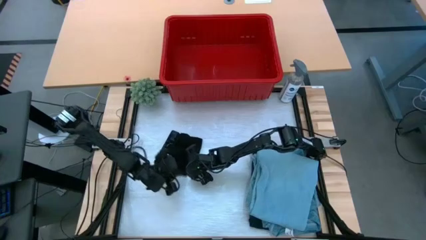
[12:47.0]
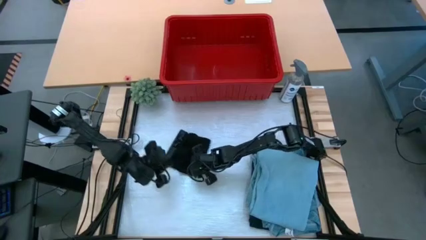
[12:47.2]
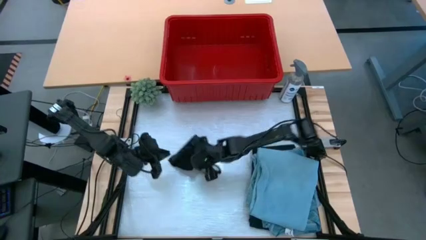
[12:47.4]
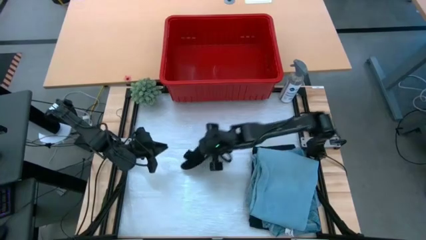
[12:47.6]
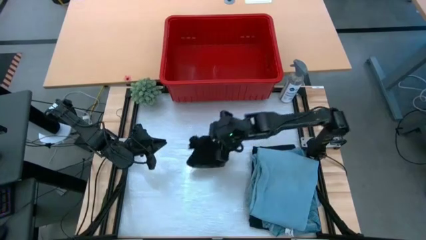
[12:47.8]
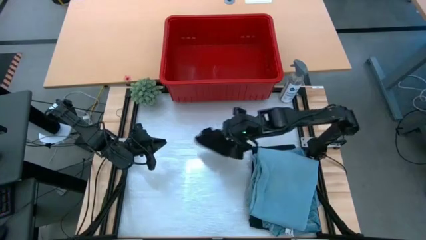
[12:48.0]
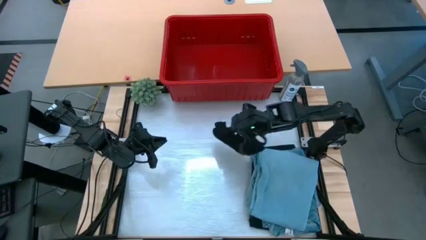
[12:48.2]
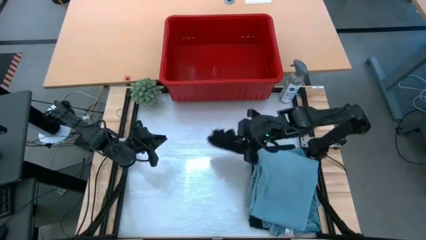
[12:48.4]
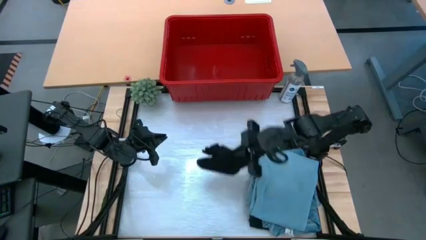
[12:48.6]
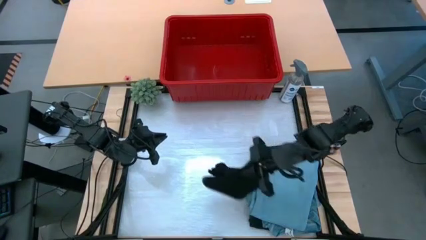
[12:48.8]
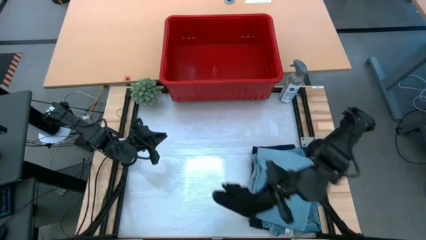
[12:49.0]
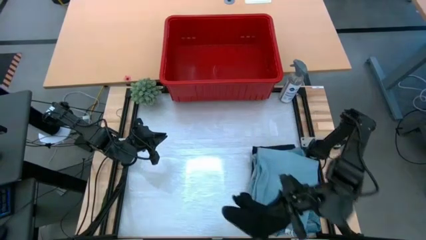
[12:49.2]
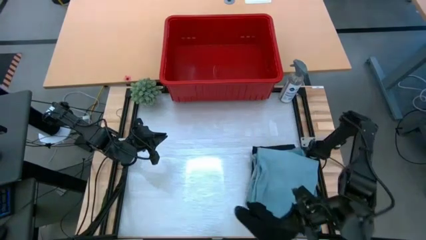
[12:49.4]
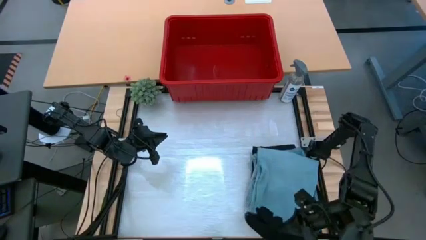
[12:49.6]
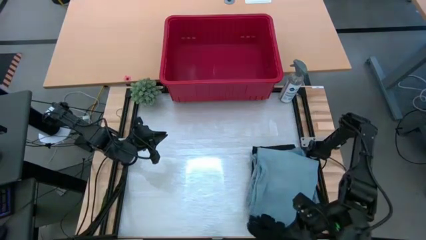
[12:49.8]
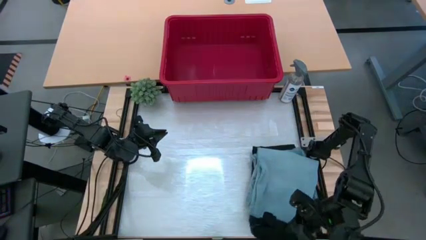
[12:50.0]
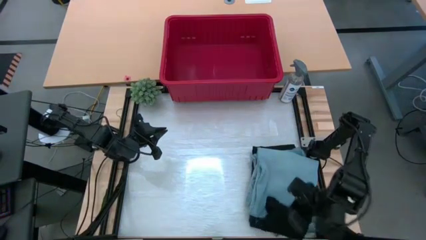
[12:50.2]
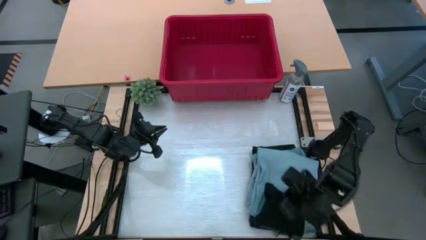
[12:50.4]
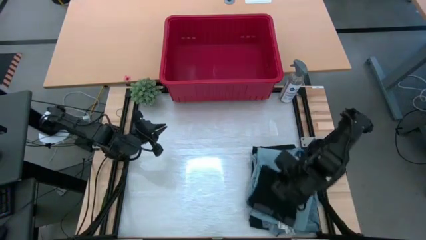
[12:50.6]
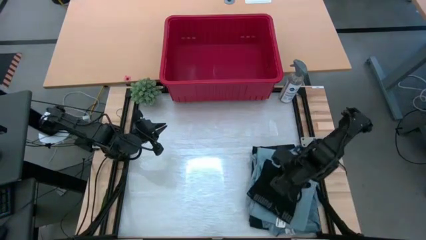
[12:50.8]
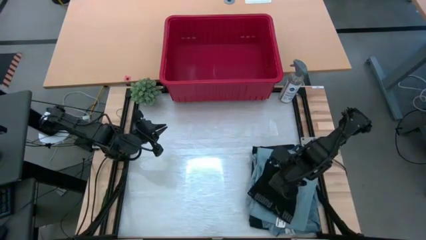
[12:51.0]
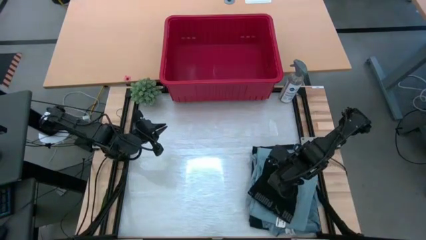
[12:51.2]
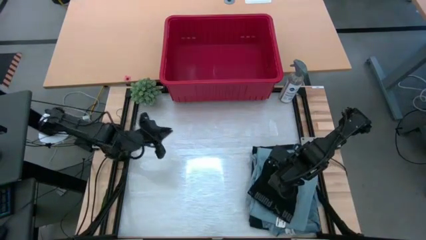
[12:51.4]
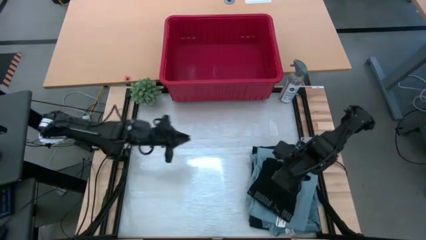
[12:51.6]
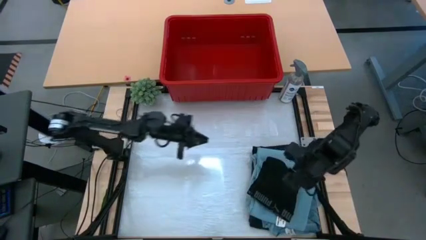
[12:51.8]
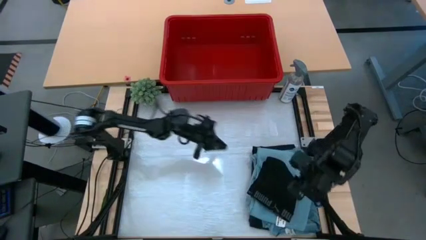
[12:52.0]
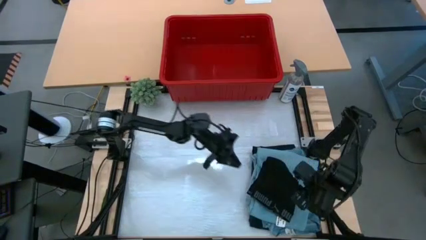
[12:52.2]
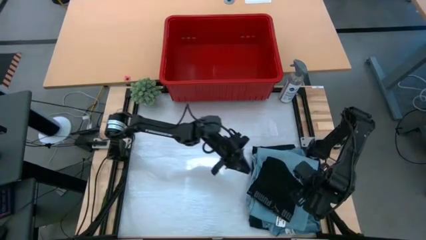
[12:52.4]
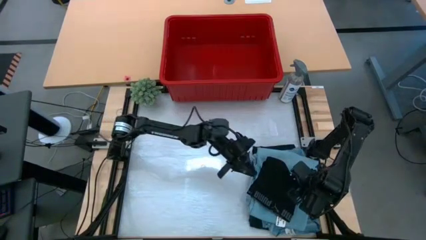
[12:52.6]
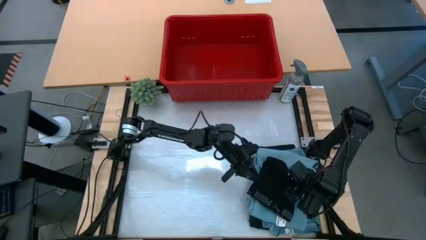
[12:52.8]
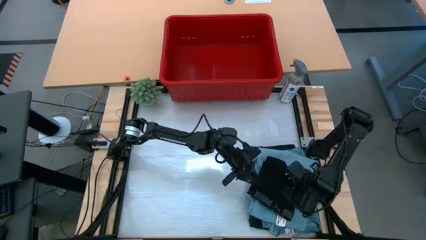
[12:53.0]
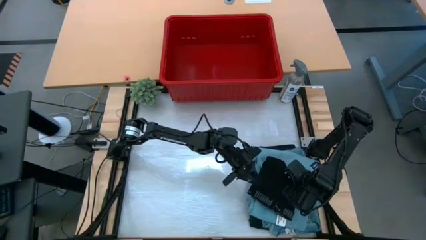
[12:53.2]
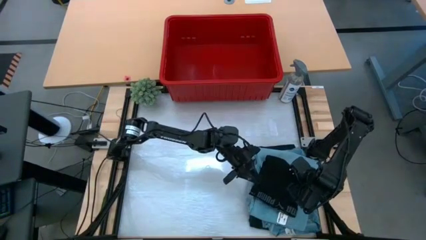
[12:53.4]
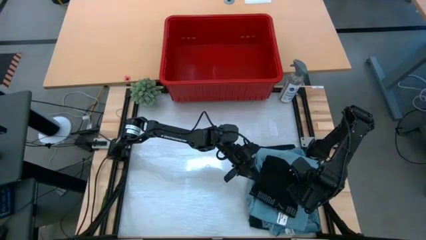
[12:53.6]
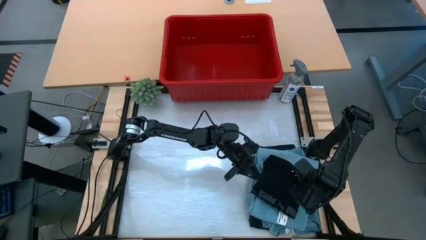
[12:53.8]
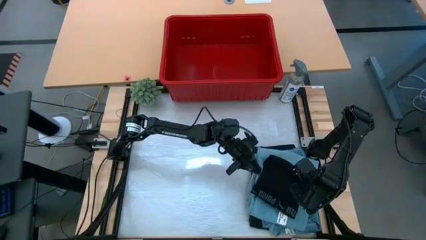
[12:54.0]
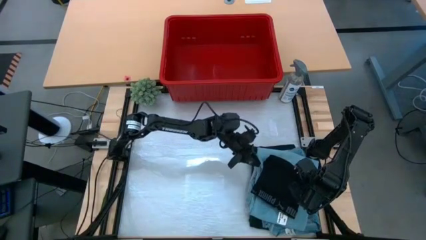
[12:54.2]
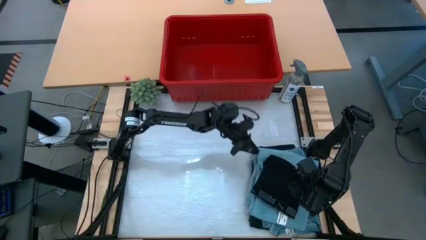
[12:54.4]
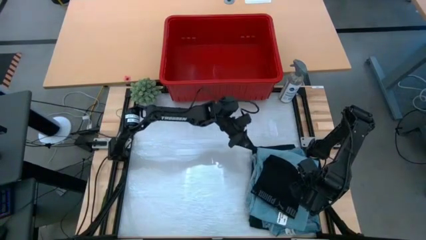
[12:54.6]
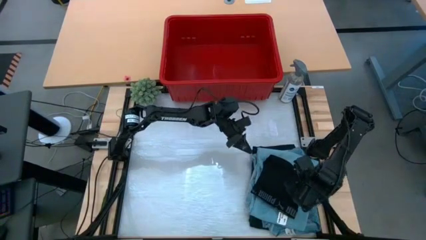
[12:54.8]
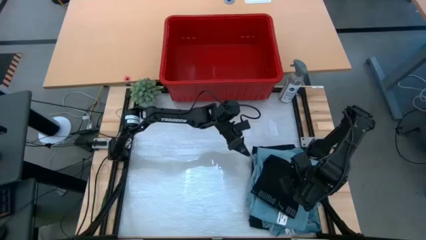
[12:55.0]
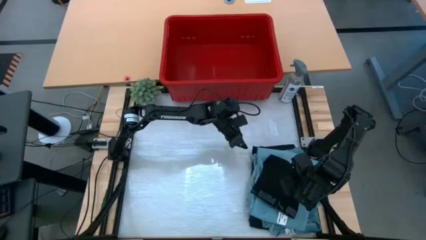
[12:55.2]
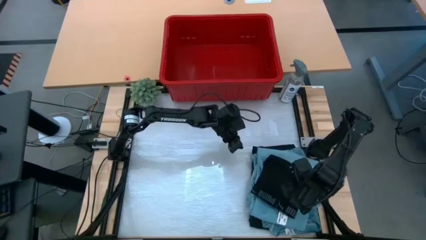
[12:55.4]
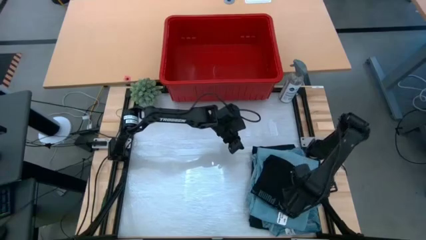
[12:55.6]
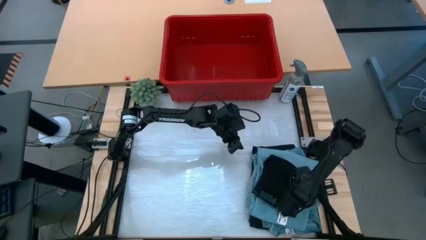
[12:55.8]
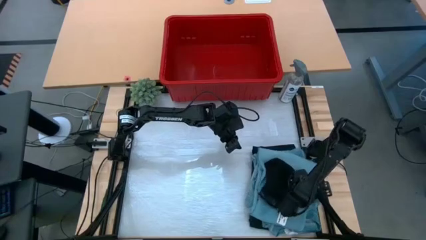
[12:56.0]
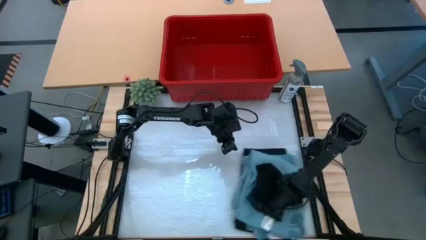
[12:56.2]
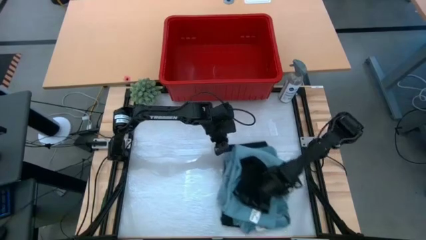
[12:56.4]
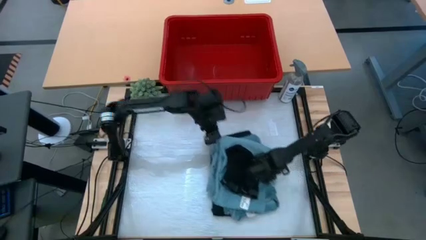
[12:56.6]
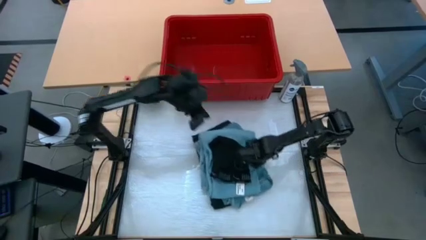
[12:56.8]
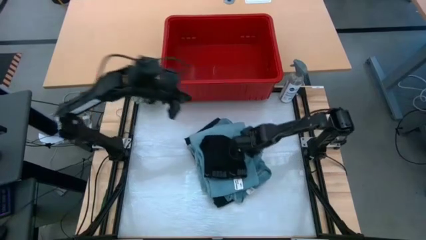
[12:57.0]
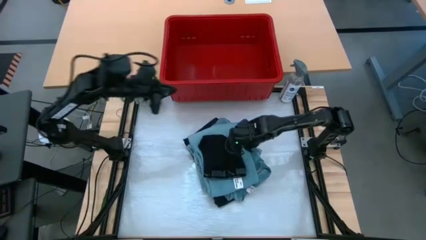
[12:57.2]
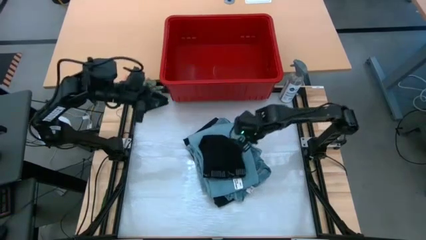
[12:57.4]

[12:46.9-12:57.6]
Task: Fold Laundry from Bin
Stack the folded black boxer on top of the light blue denim pants
